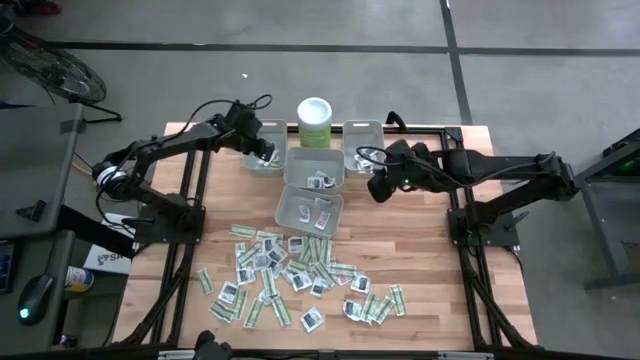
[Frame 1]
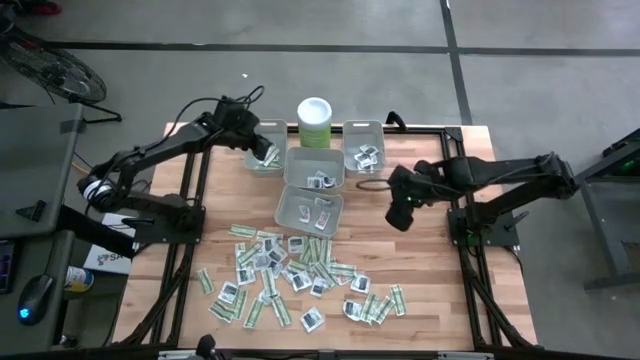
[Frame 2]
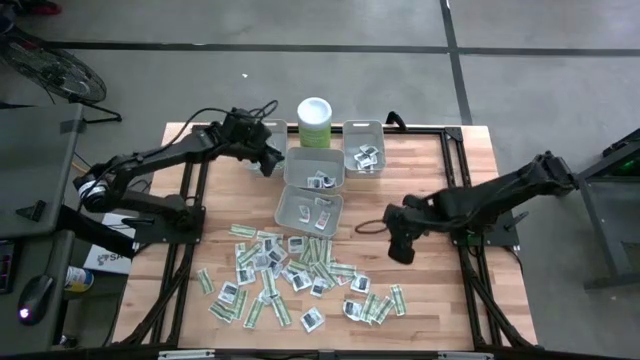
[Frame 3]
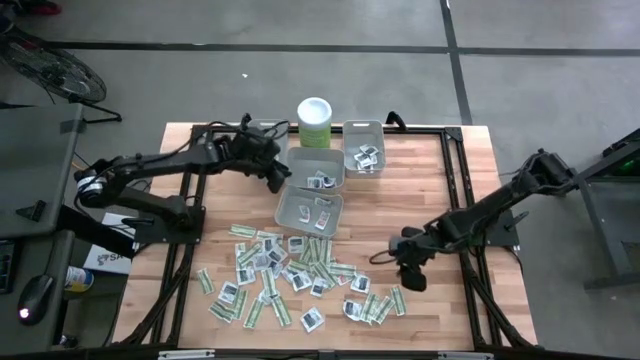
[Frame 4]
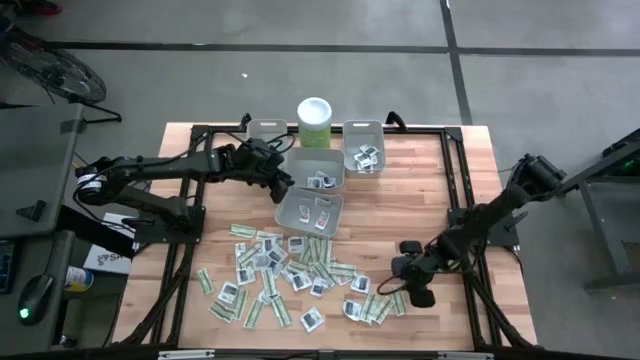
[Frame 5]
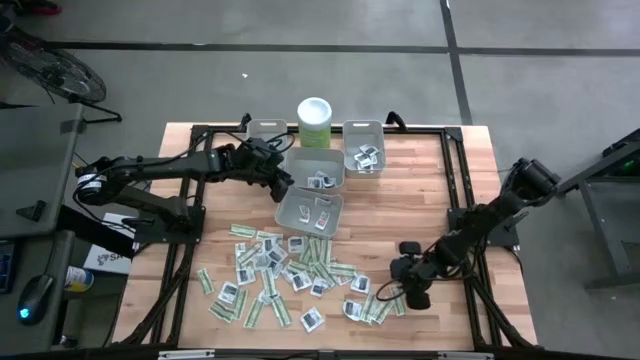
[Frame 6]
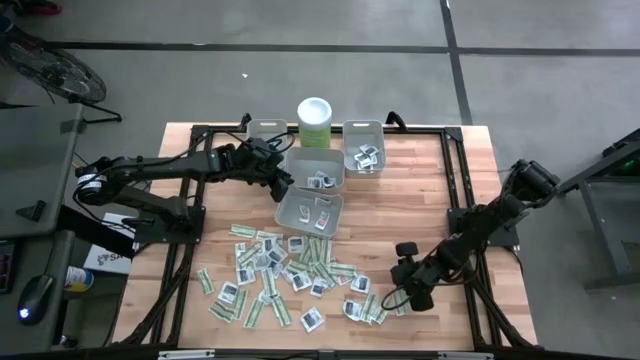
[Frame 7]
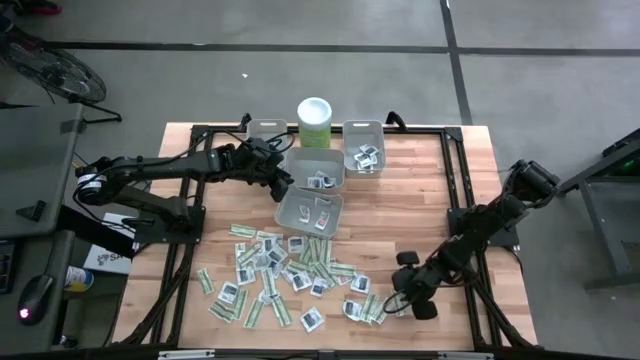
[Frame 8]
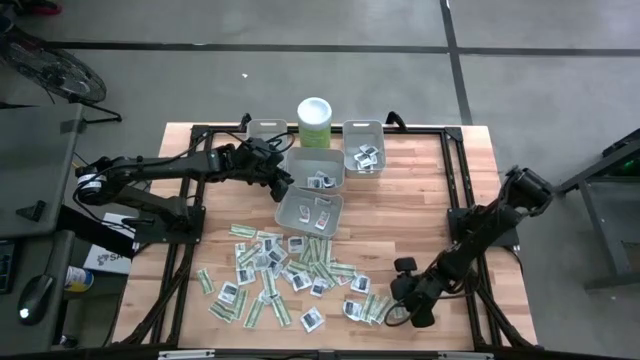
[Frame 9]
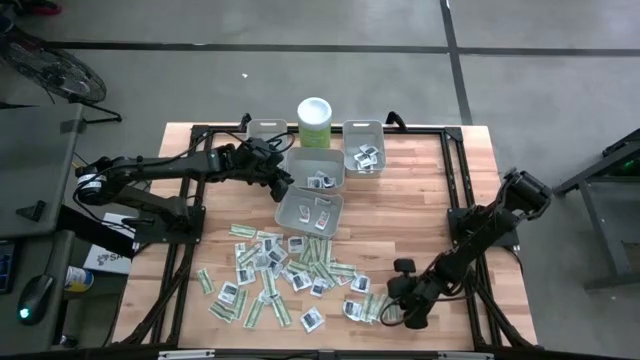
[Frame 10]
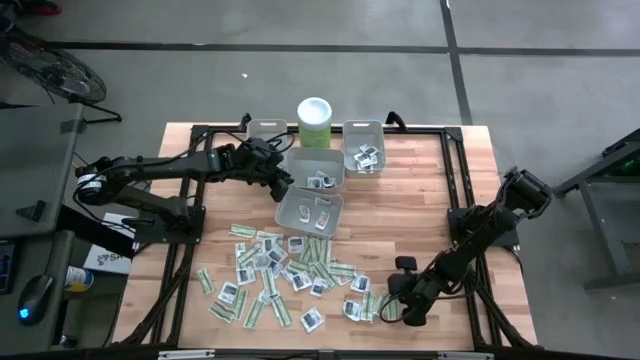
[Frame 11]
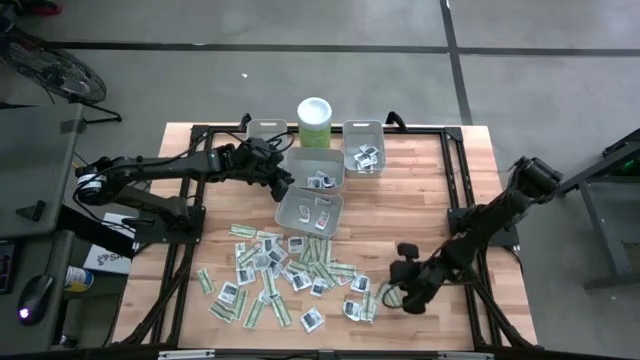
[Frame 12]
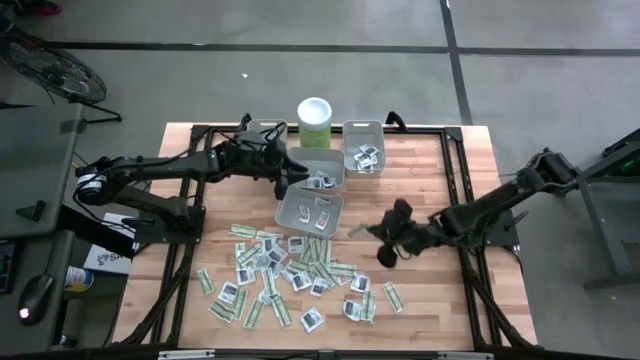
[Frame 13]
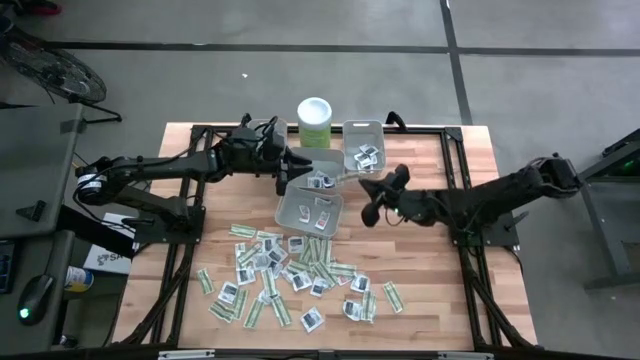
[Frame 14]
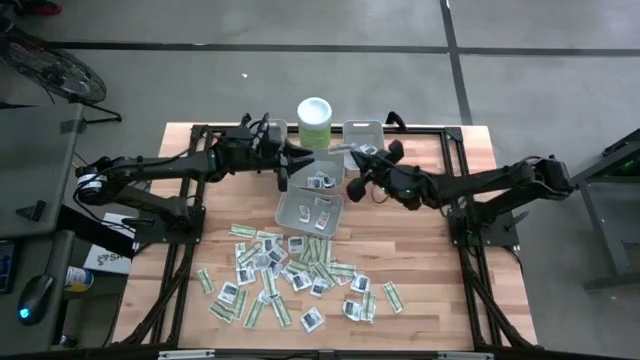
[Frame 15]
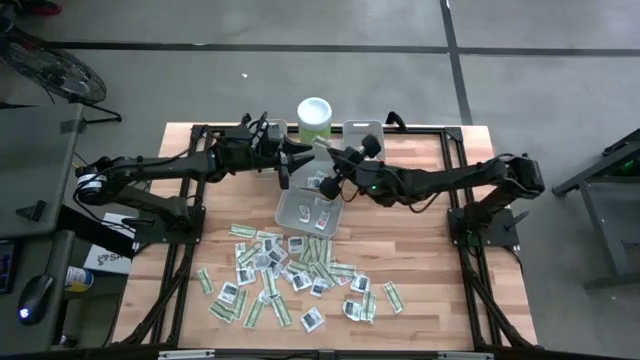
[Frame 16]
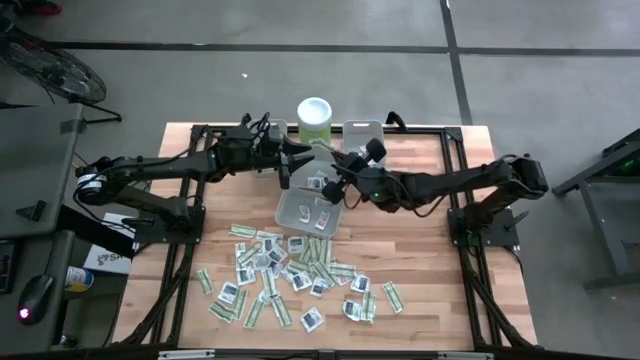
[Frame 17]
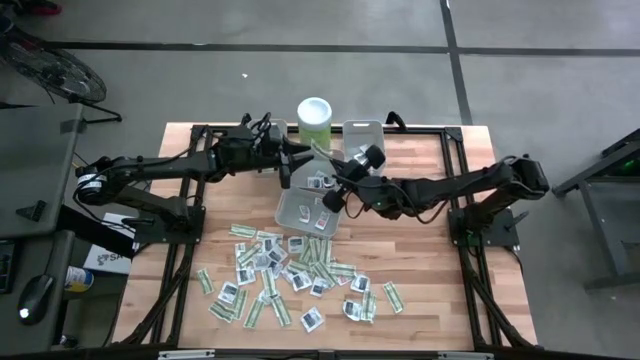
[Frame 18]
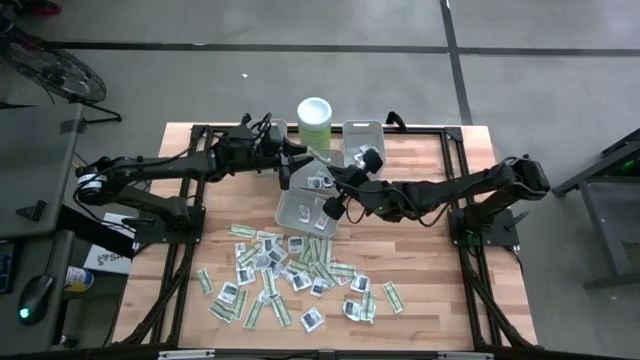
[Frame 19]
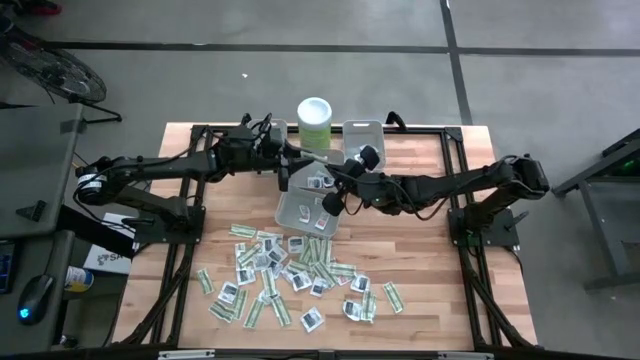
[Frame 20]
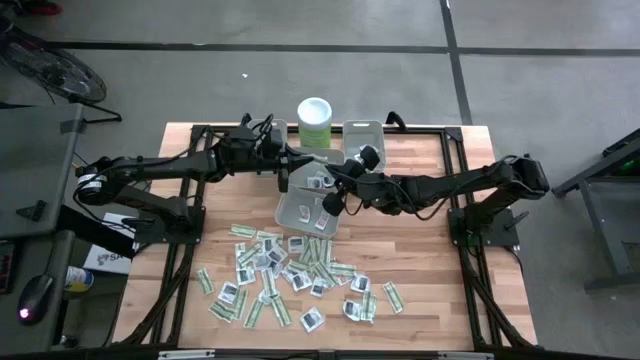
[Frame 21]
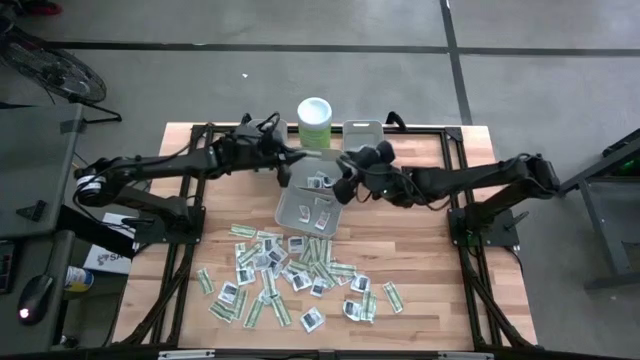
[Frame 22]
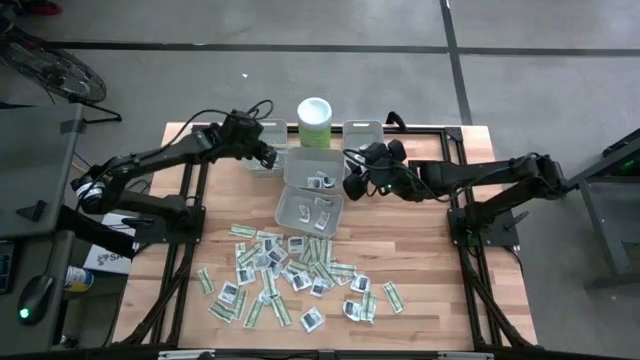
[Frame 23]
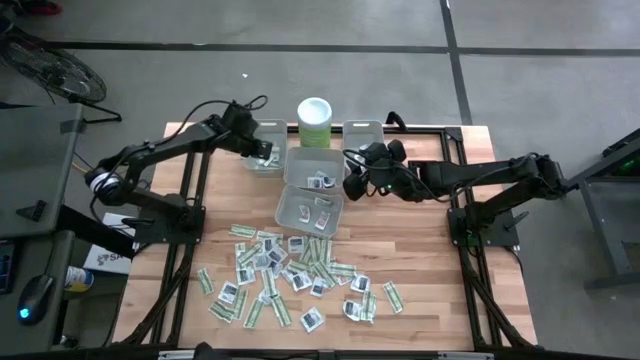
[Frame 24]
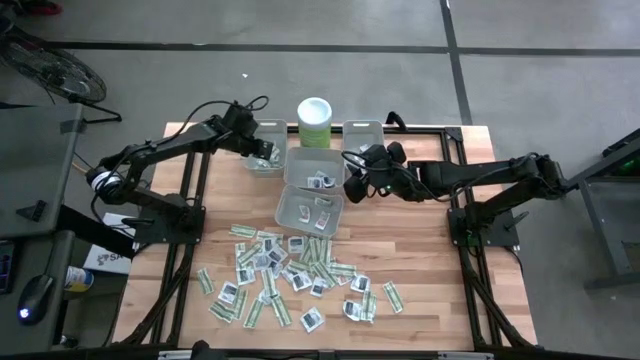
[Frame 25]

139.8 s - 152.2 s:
Task: Pick & Place First Aid Supplies
Put the bandage pack into the left bin

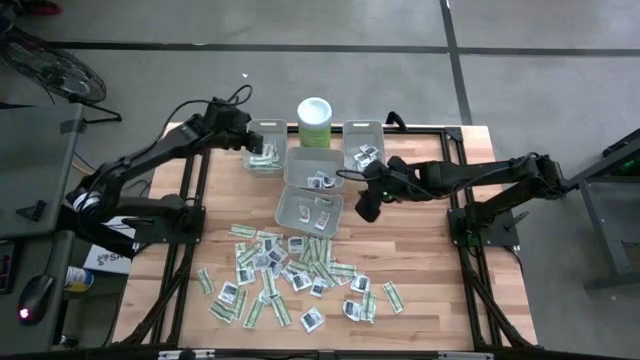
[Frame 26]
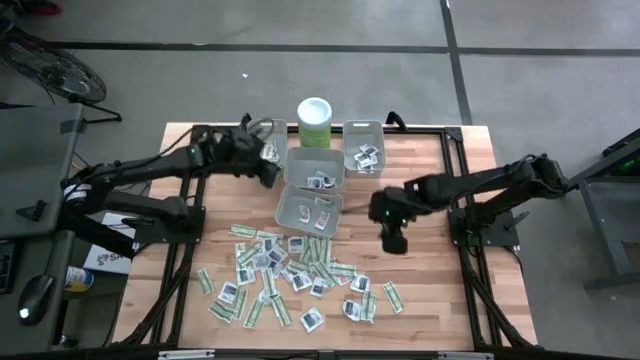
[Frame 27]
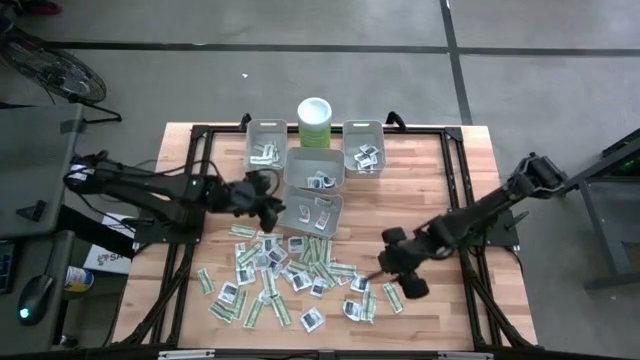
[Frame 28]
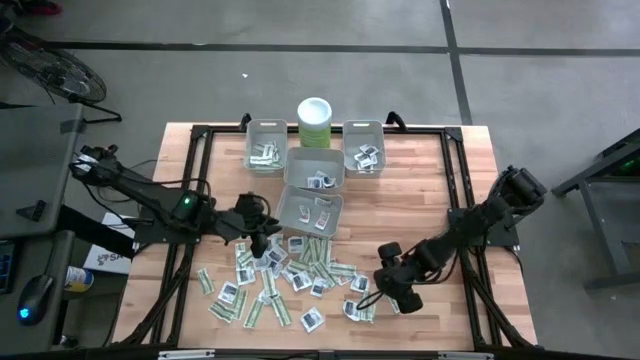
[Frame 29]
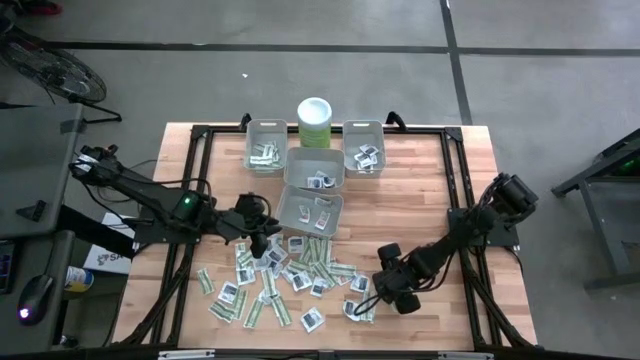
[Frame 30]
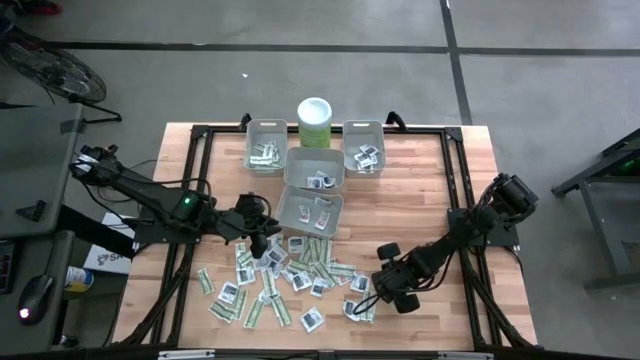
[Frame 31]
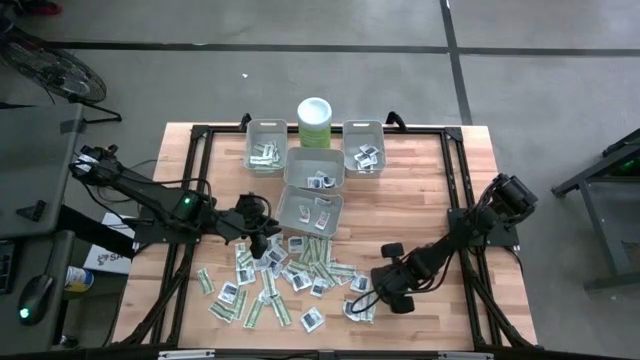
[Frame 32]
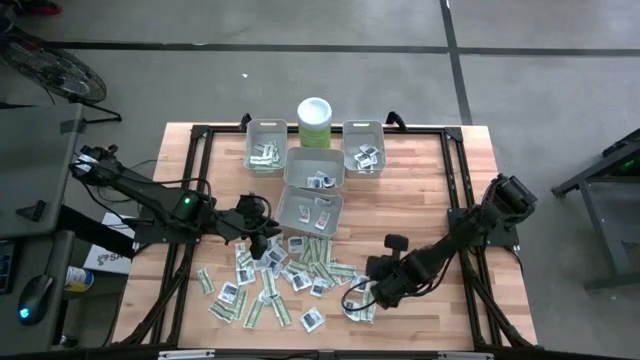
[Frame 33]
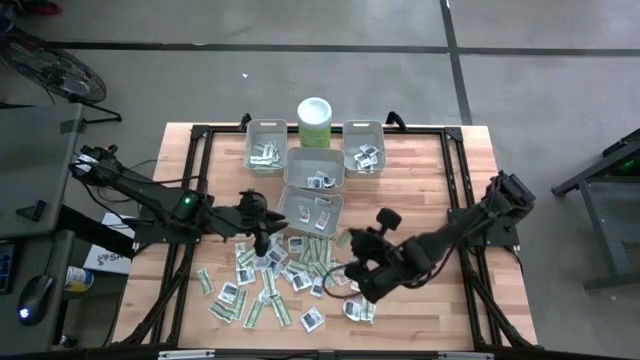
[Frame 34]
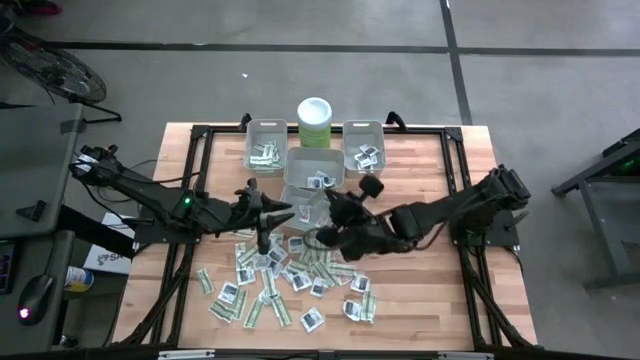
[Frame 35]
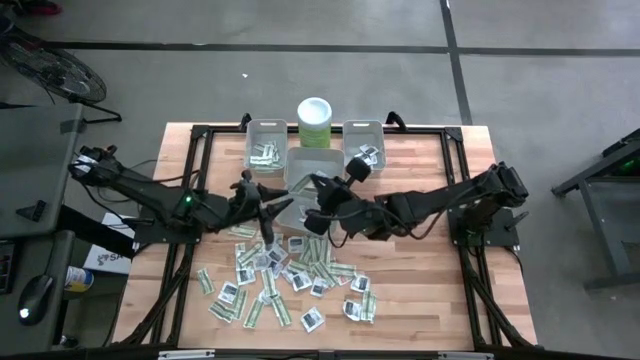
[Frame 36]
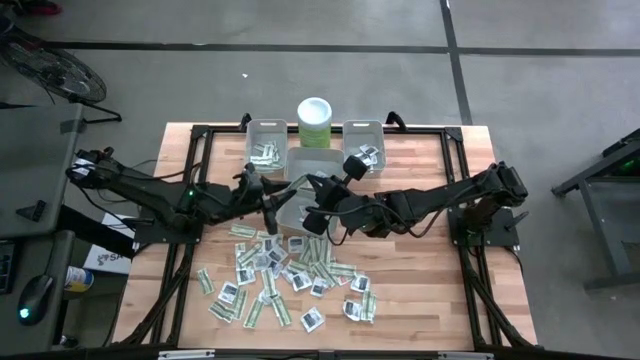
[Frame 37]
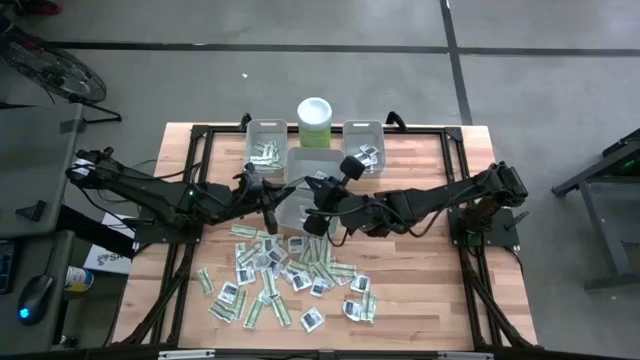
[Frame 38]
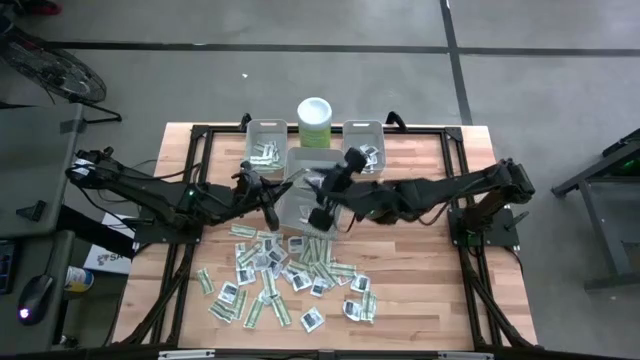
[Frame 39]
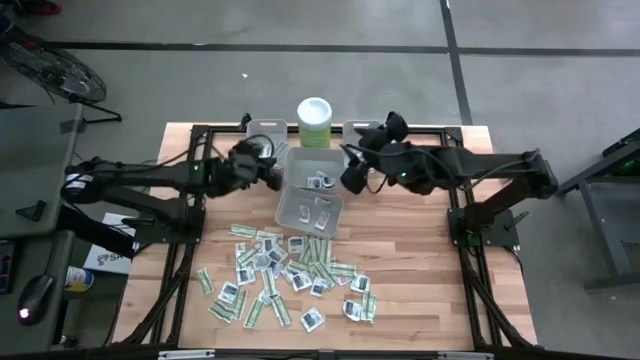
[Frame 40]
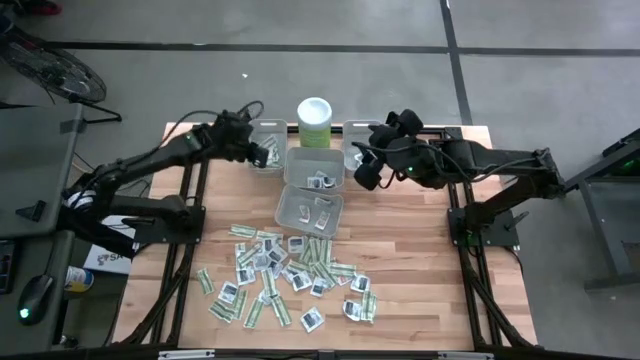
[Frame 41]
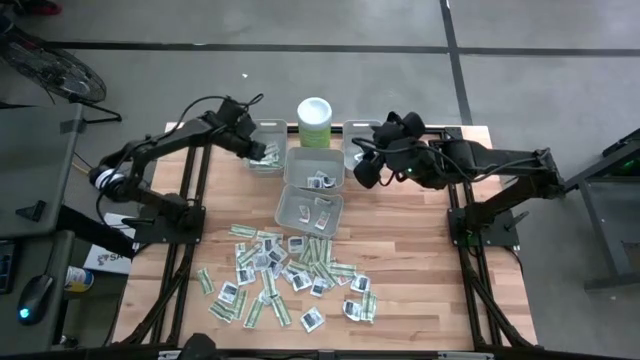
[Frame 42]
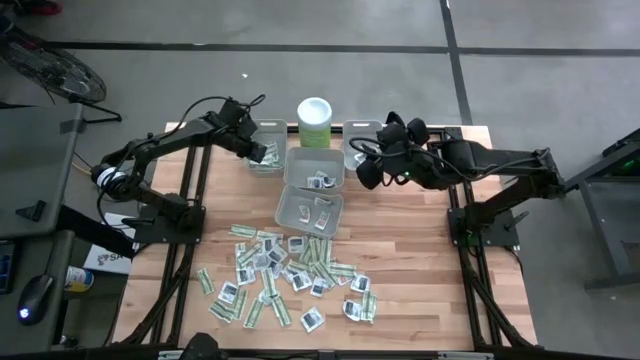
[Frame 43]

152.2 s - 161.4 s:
Put the bandage pack into the left bin
